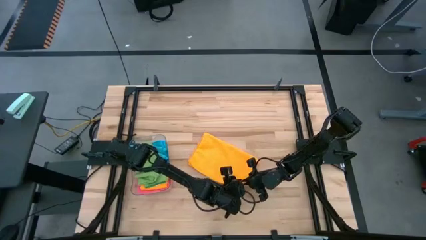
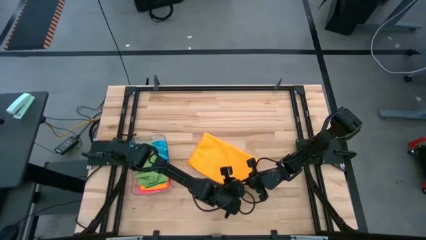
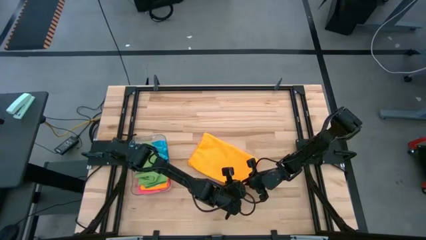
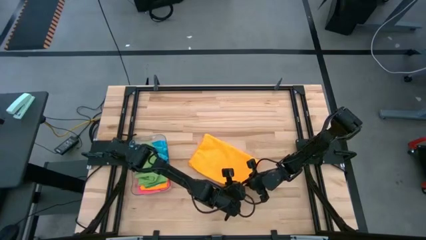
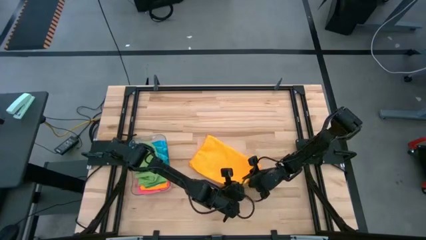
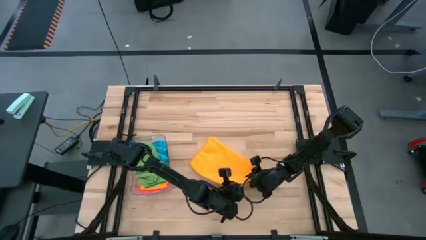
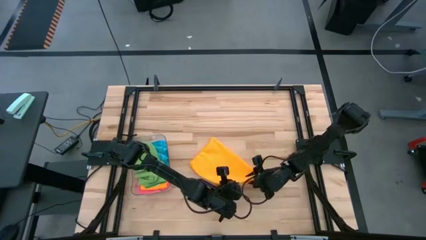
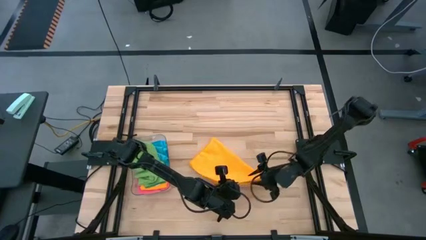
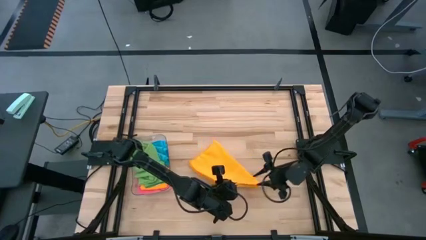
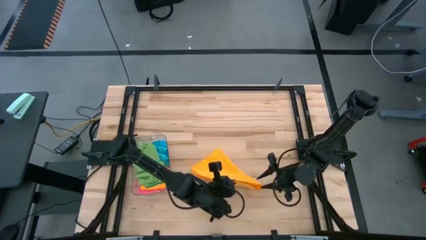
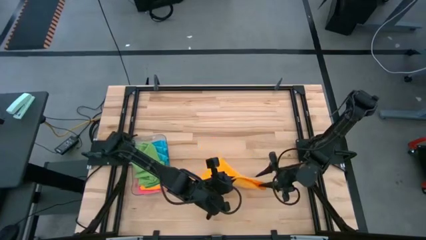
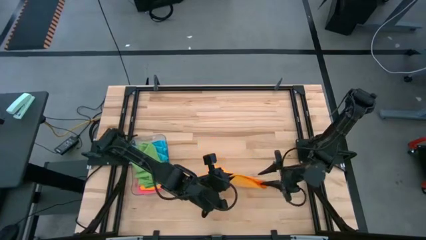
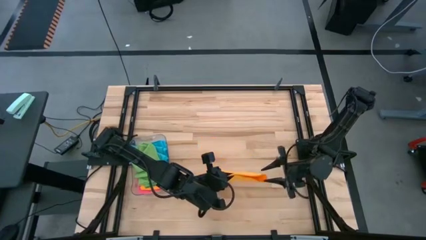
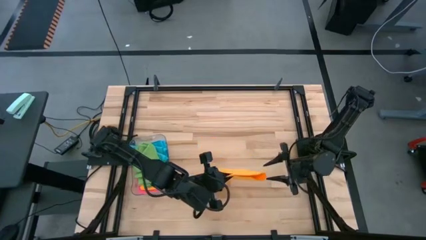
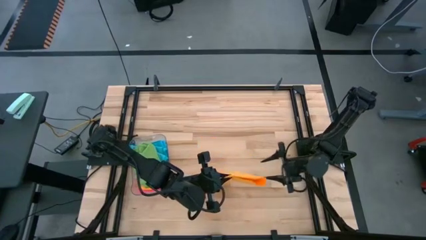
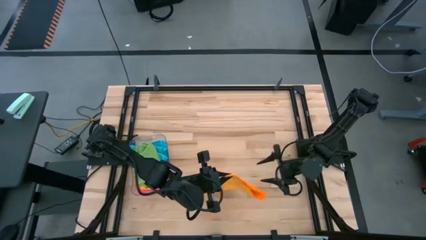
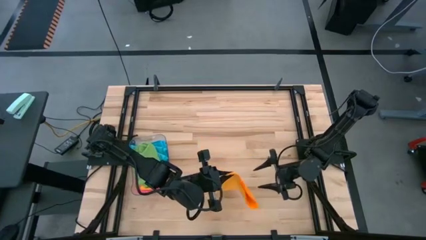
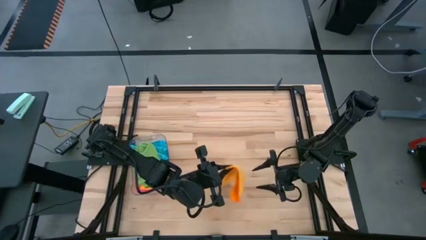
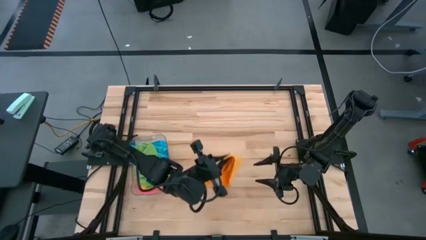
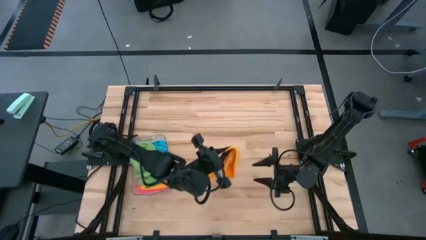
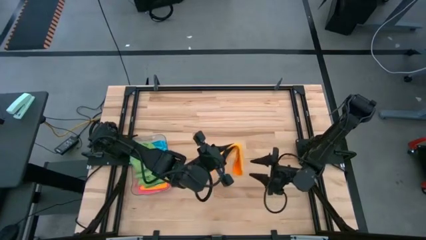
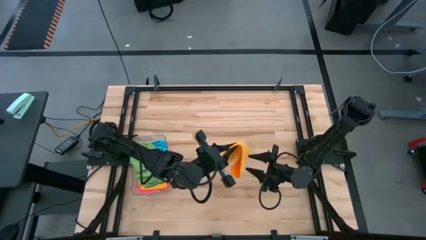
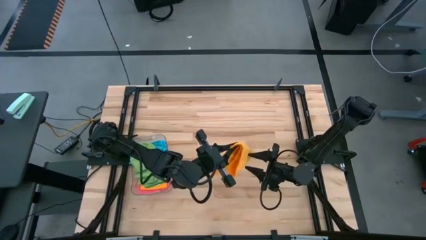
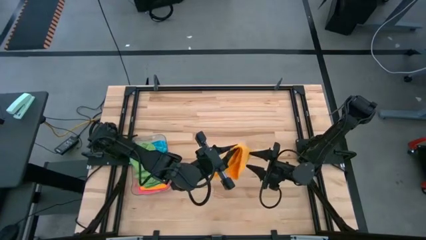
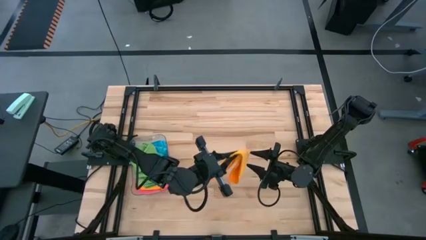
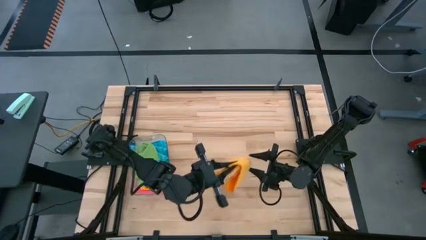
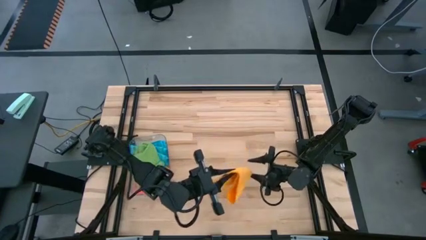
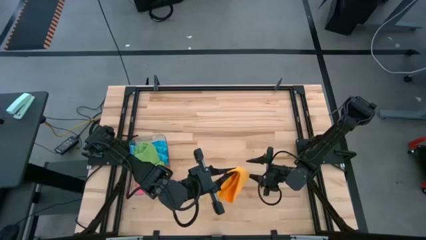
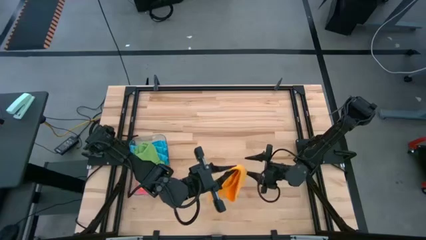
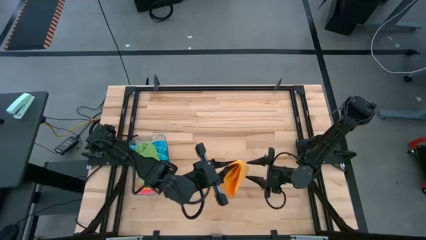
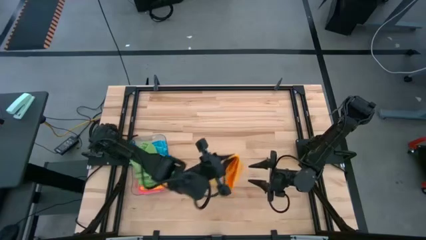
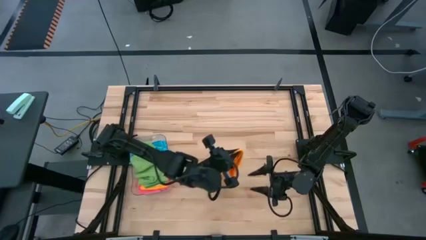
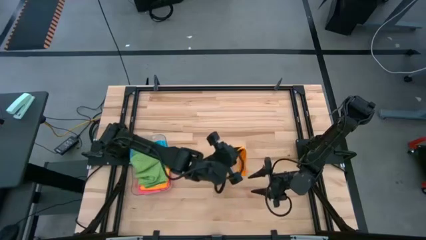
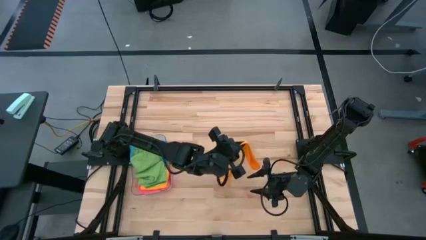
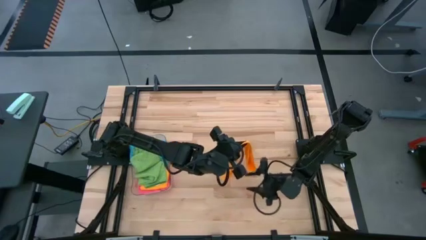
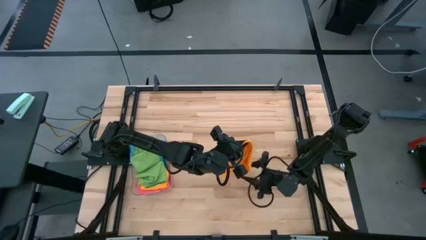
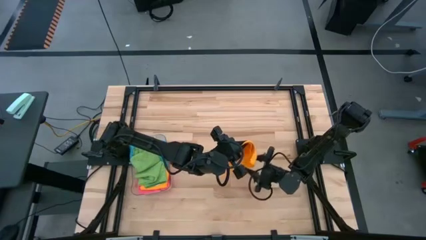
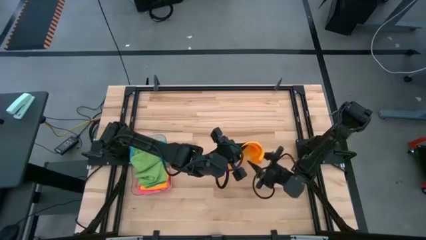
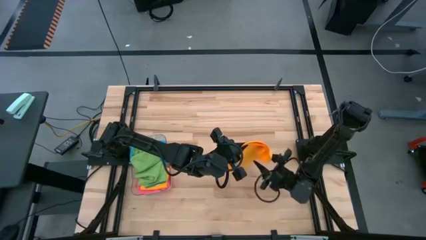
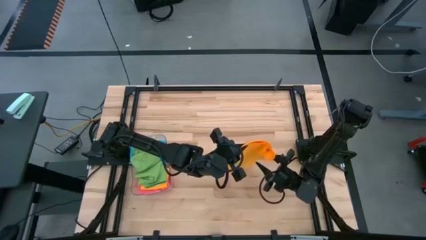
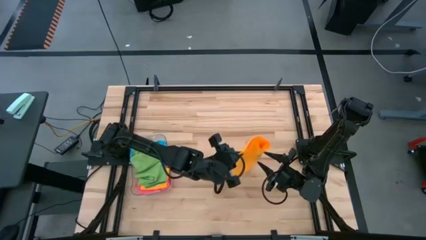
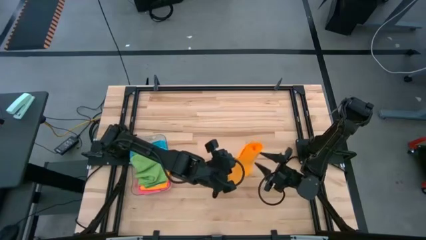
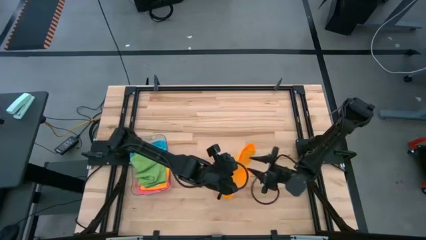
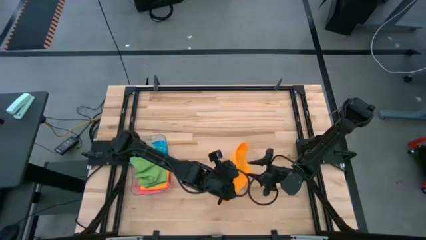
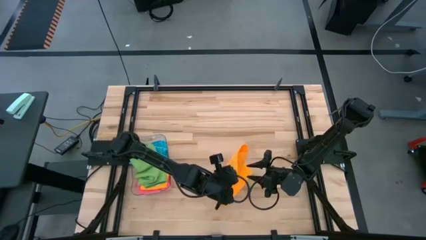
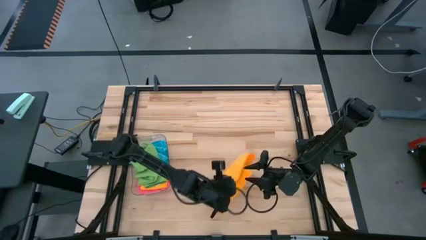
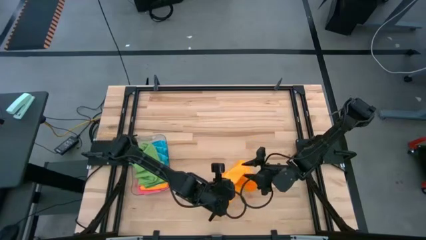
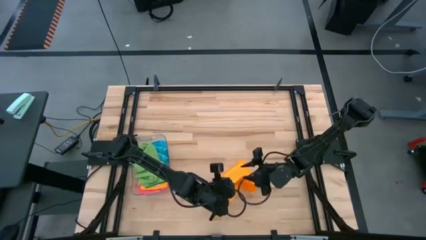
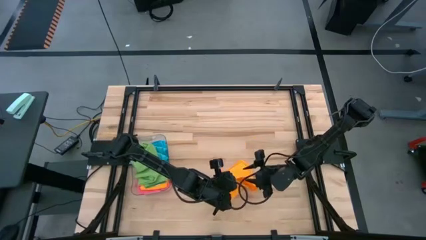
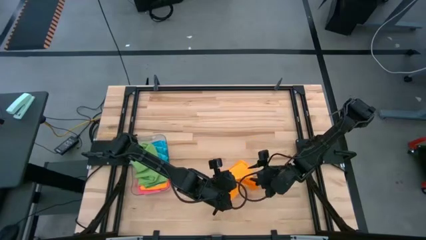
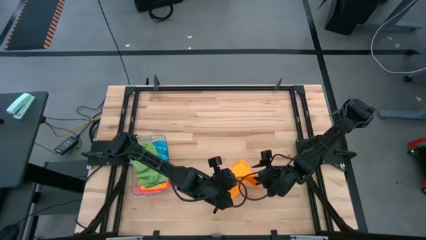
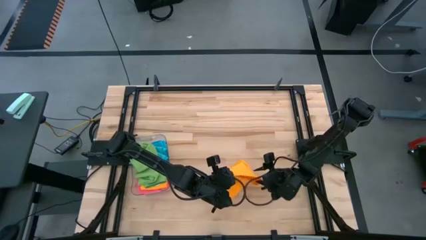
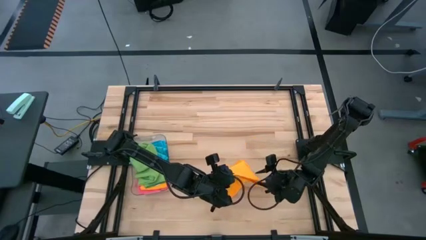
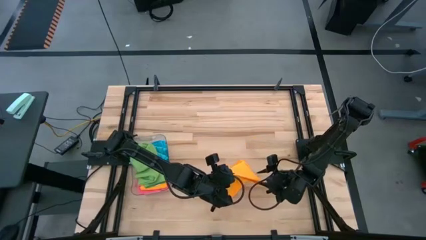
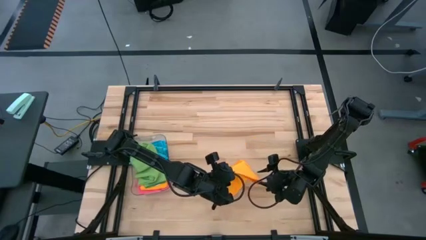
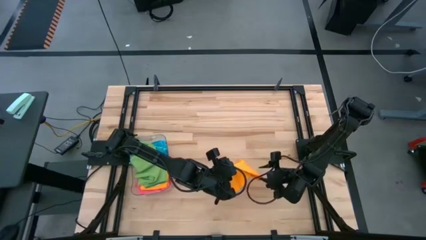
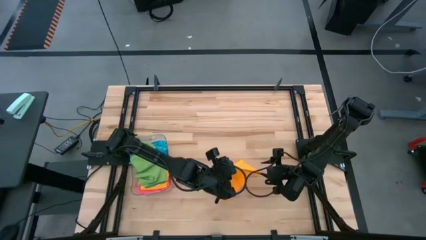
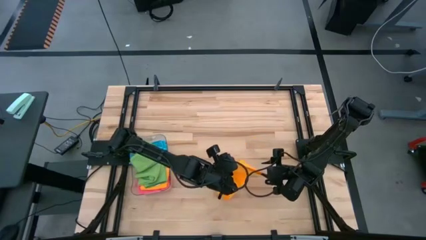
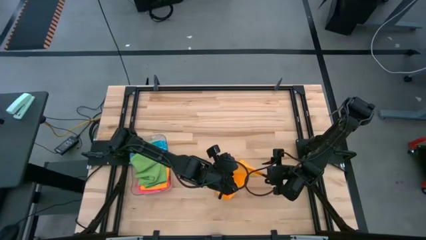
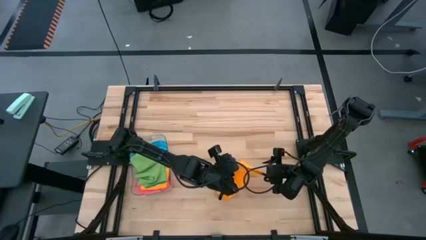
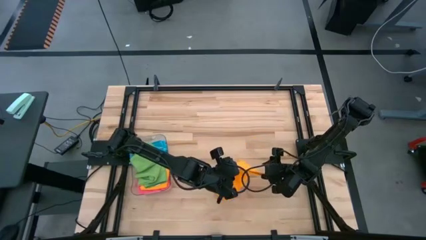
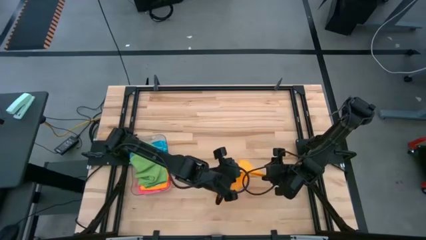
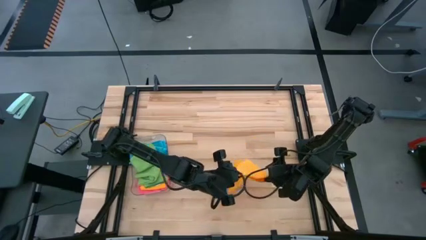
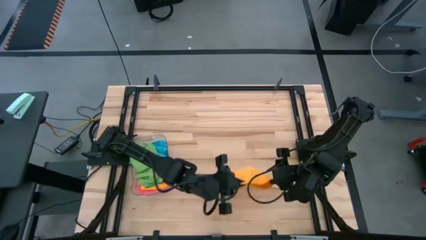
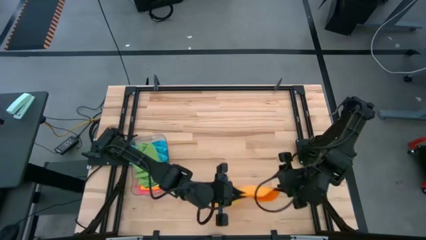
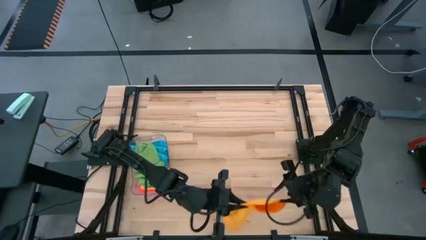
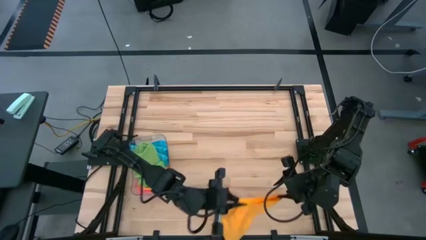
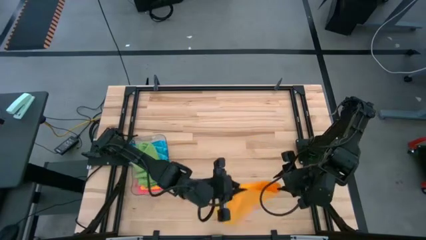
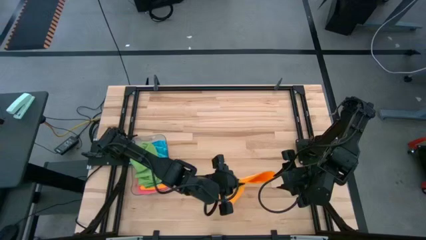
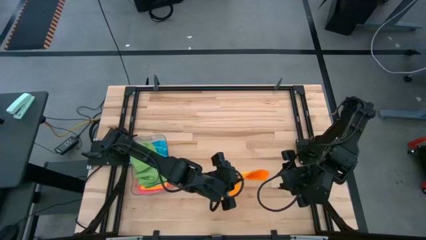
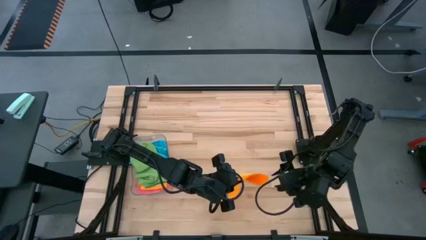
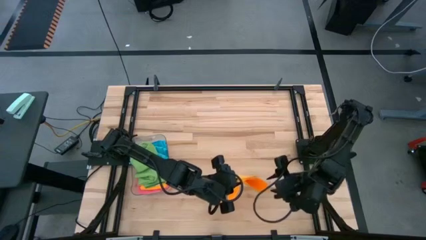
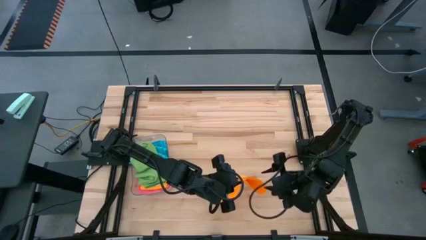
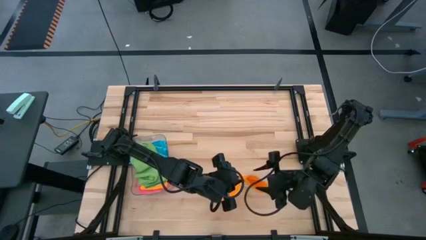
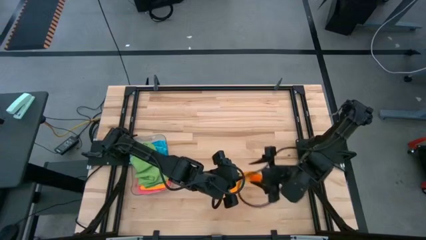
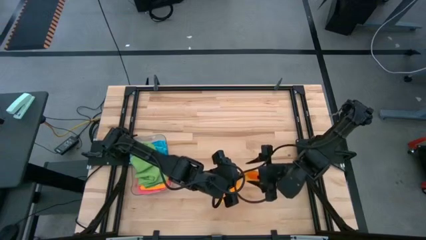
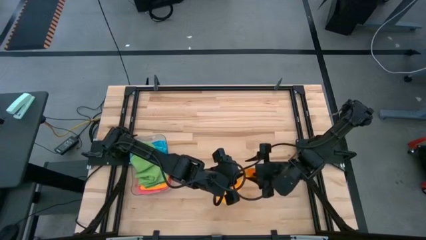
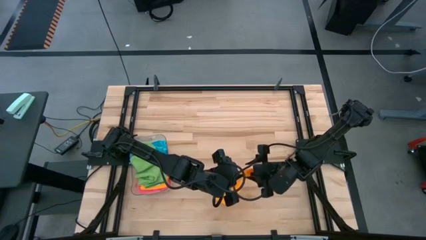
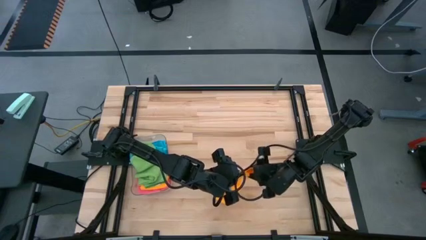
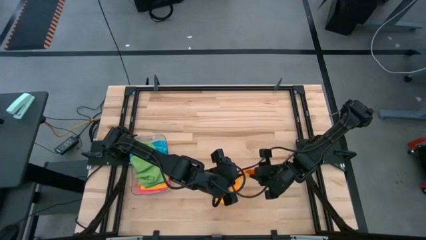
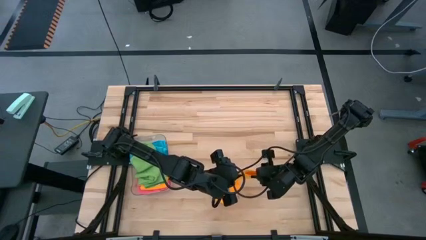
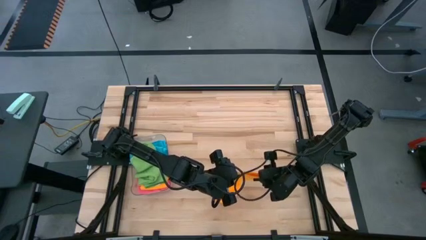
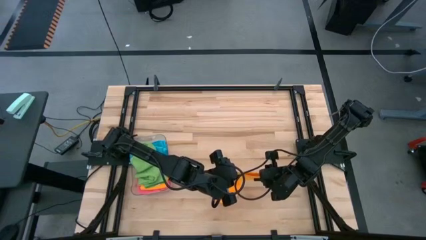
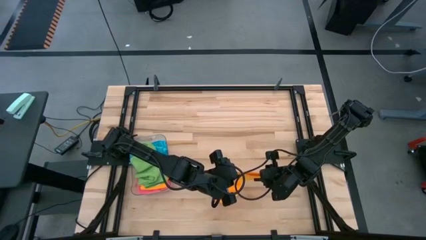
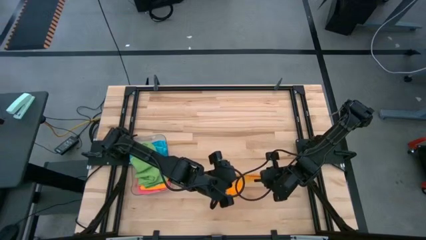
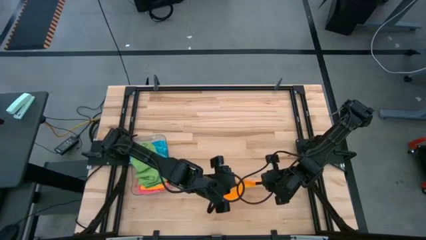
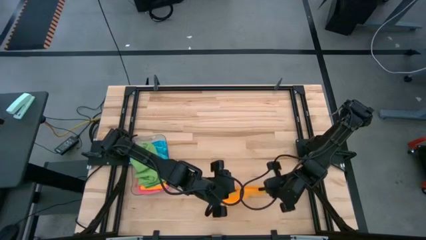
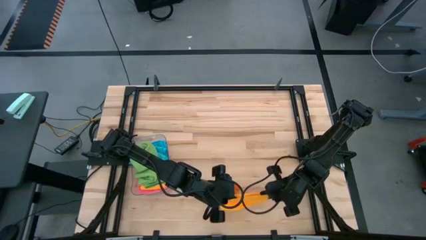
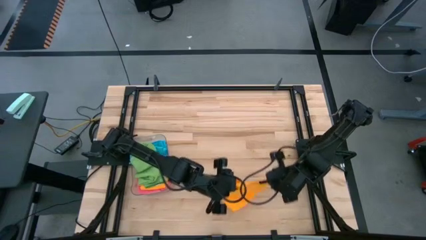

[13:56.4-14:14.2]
Task: Fold microfiber towels
Fold the yellow microfiber cloth
